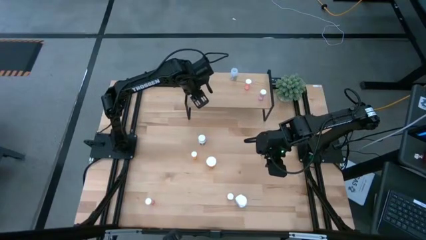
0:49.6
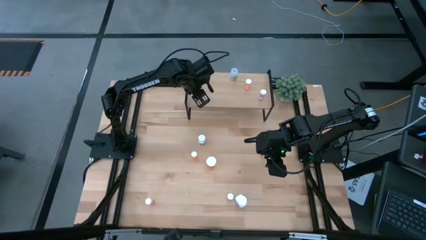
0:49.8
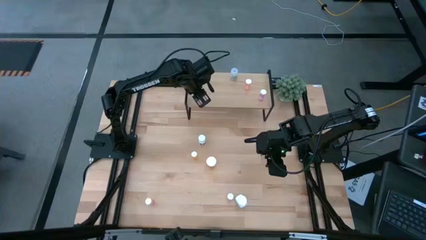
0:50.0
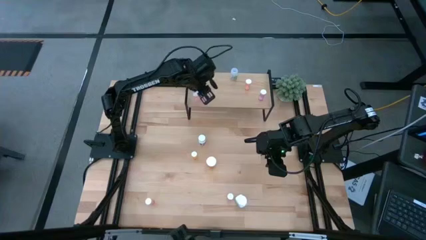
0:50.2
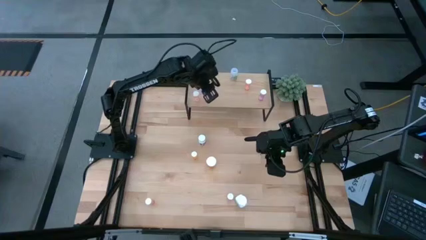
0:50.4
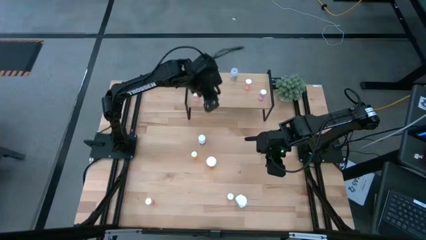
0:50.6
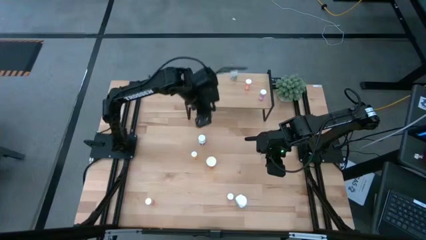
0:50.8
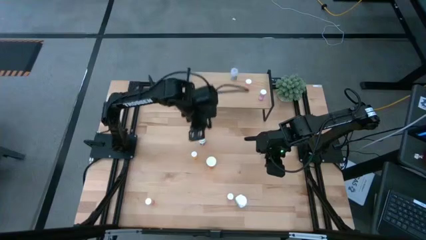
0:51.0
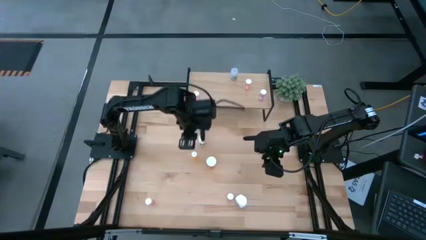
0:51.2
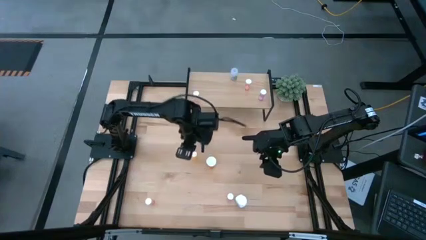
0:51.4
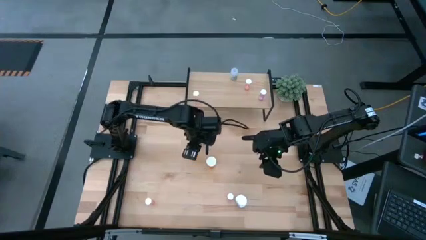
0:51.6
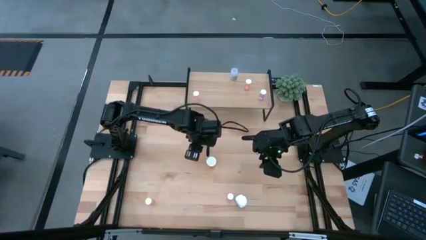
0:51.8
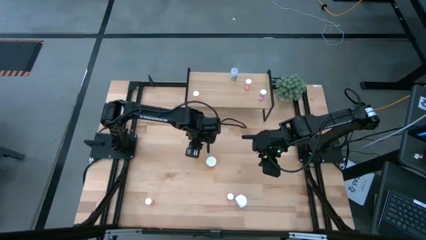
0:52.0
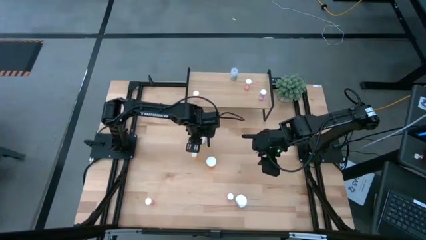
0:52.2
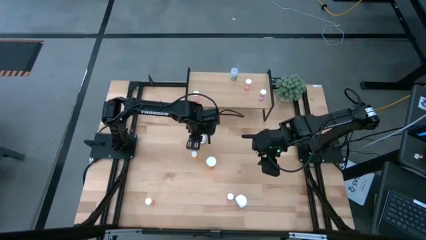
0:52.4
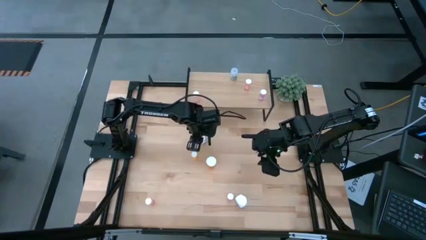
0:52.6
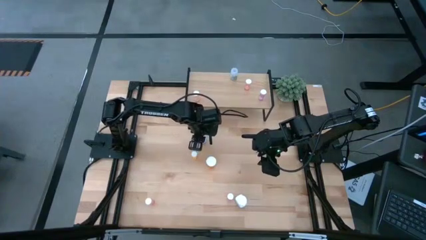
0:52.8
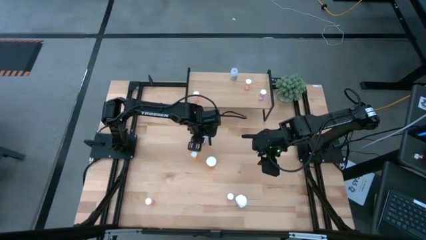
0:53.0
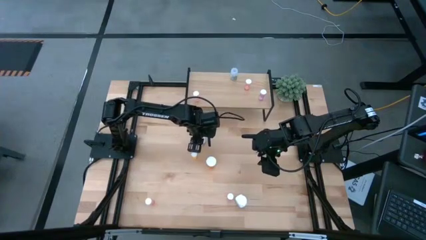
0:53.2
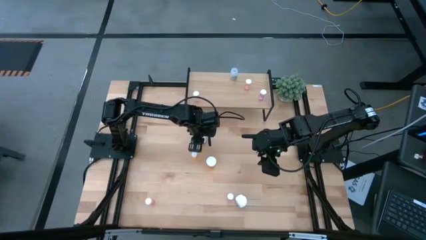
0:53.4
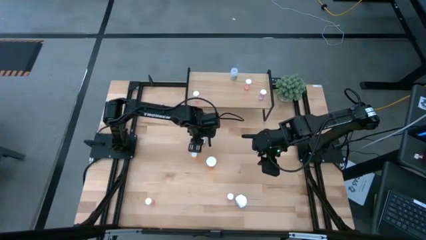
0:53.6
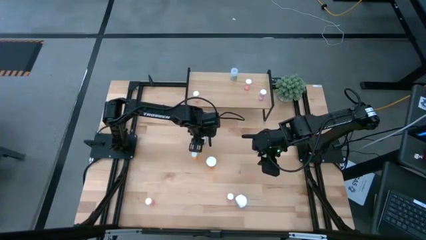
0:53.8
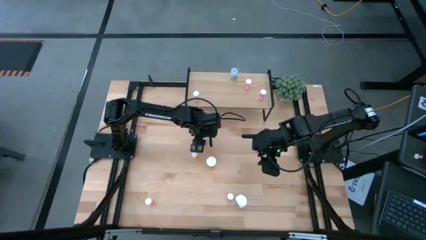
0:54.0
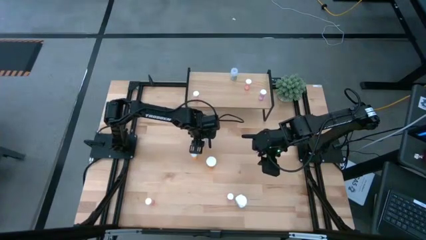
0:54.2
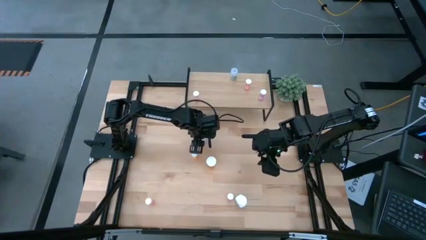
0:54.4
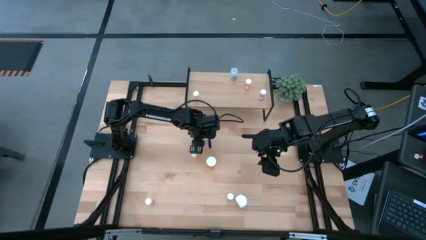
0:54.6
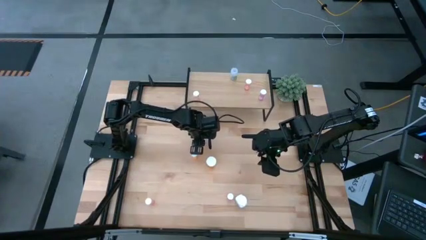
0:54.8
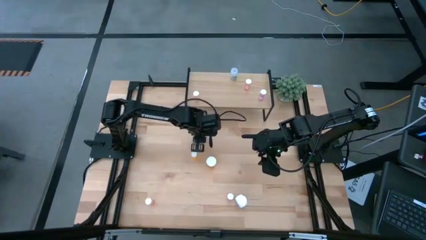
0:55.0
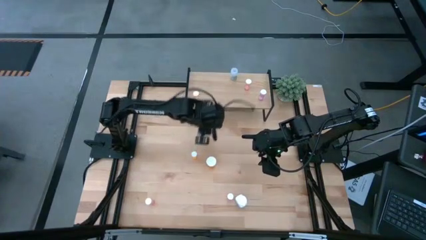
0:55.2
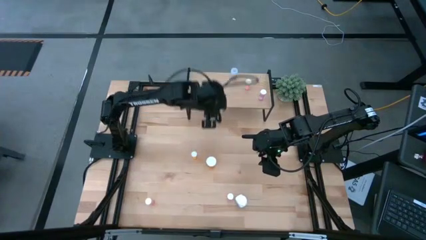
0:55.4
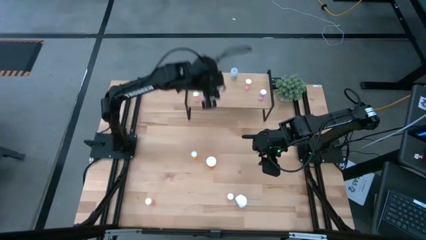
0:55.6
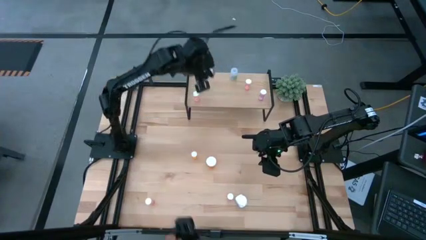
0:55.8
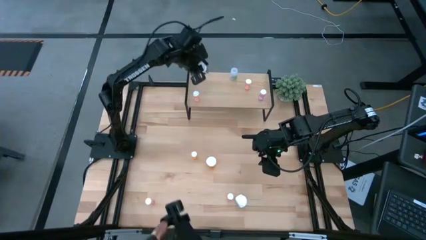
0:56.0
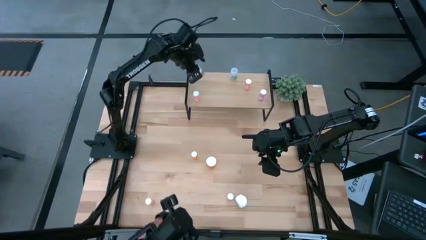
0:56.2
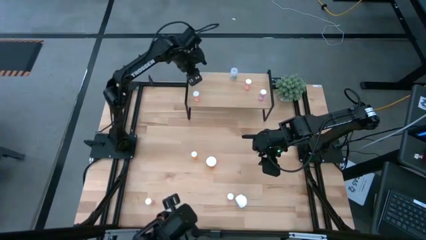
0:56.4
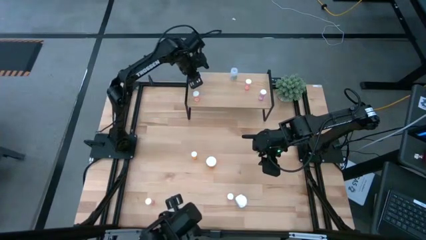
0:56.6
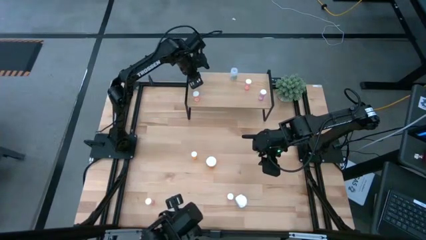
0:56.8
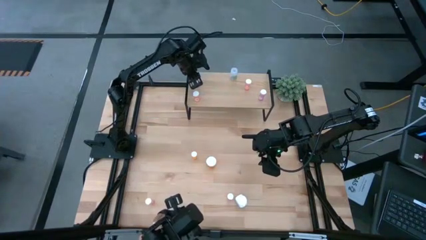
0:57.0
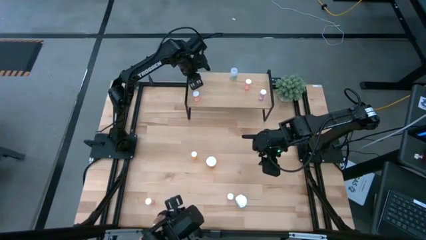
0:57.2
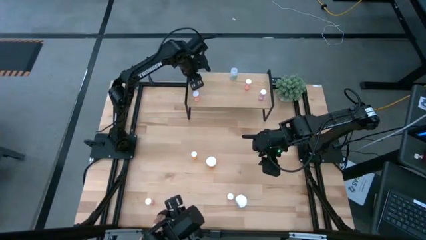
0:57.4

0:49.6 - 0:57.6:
Task: Pick and place medicine bottles onto shelf by color
Put the white pill bottle on the shelf

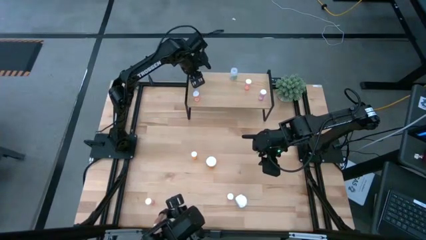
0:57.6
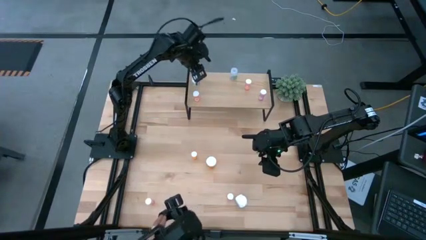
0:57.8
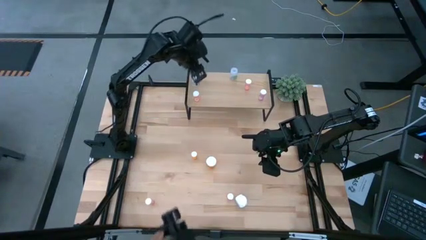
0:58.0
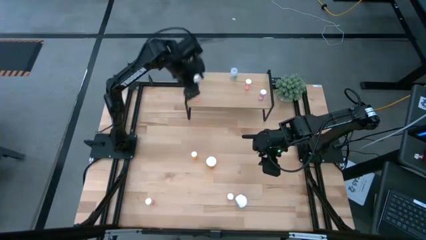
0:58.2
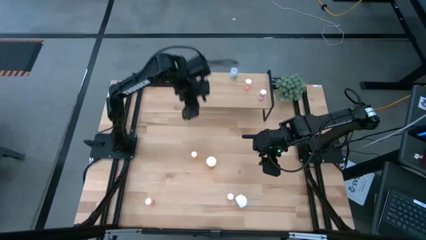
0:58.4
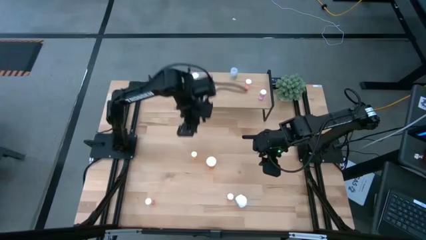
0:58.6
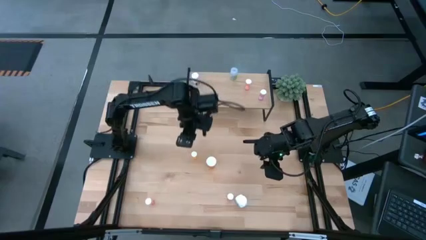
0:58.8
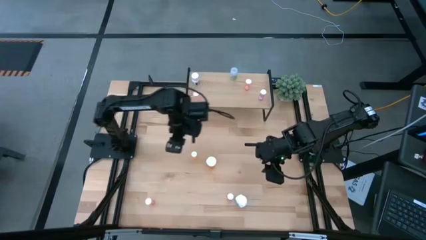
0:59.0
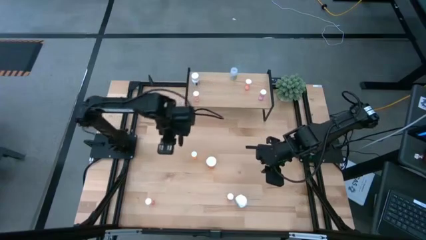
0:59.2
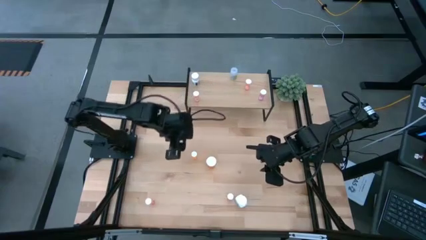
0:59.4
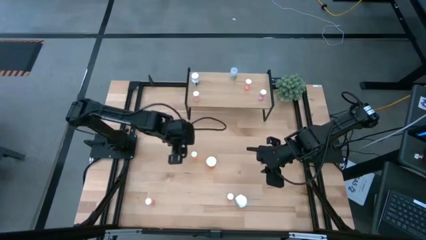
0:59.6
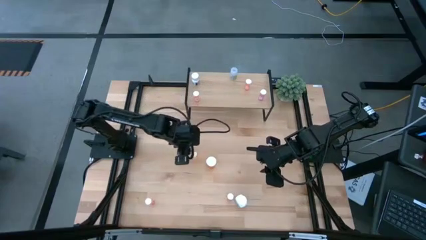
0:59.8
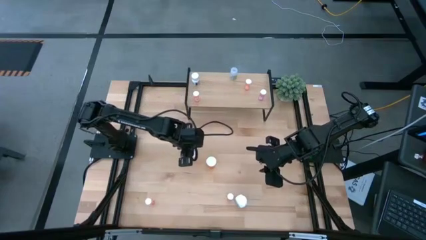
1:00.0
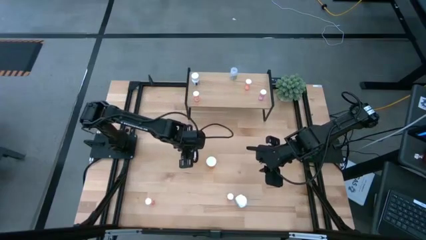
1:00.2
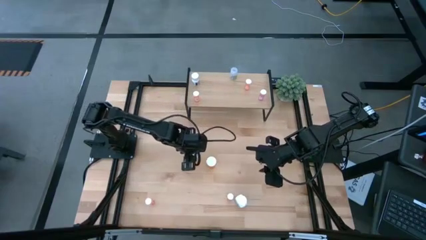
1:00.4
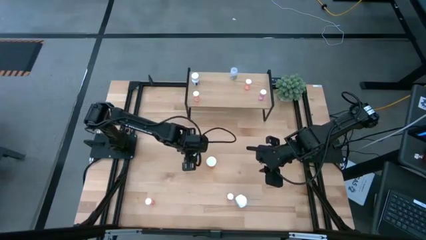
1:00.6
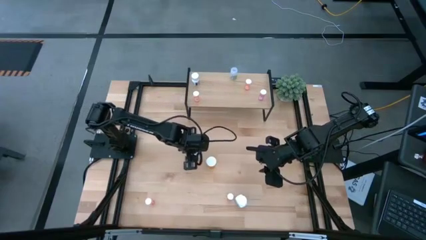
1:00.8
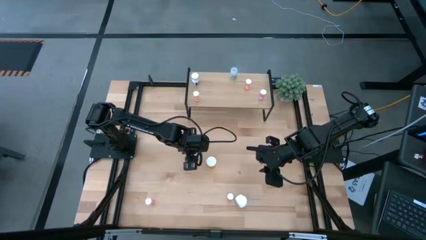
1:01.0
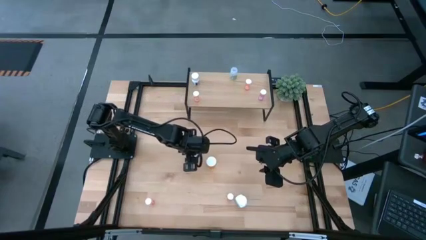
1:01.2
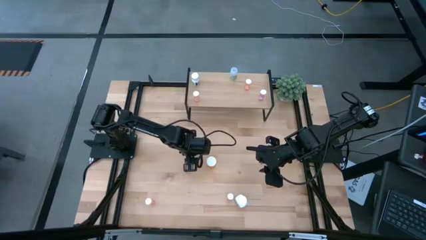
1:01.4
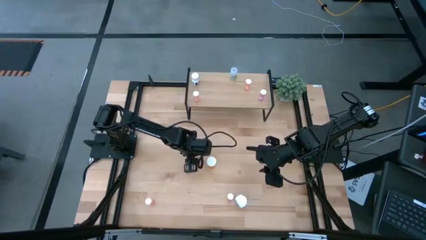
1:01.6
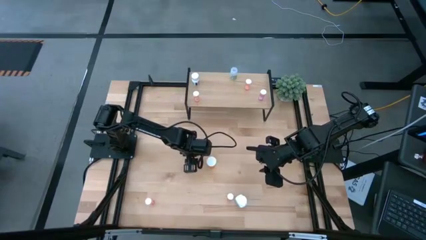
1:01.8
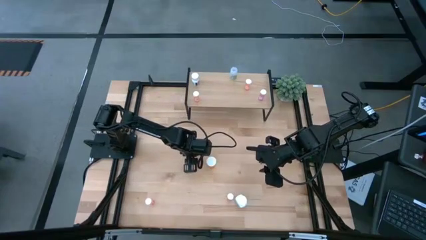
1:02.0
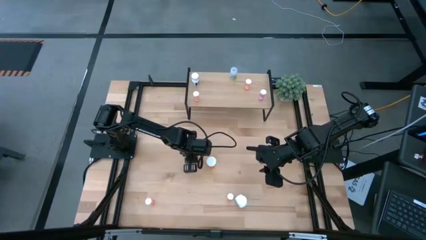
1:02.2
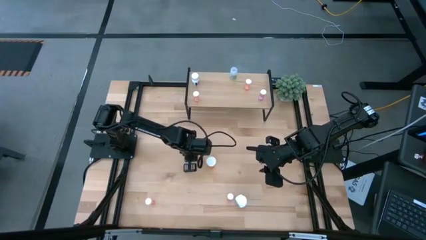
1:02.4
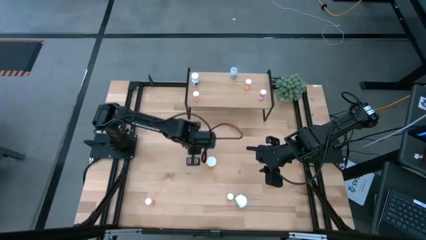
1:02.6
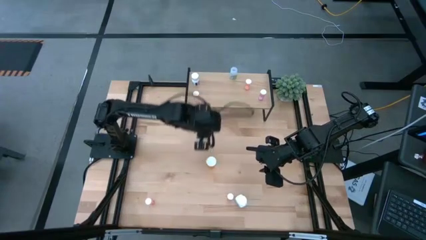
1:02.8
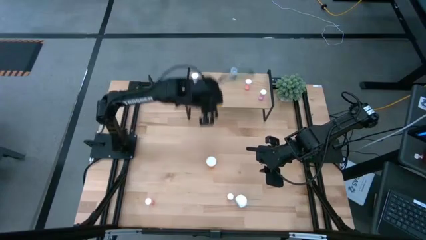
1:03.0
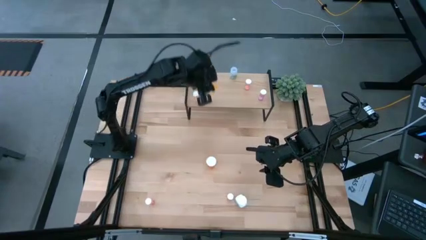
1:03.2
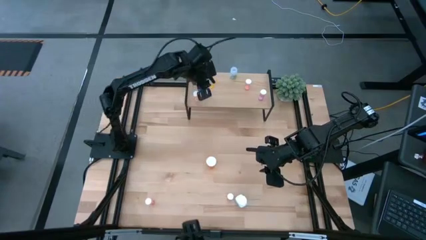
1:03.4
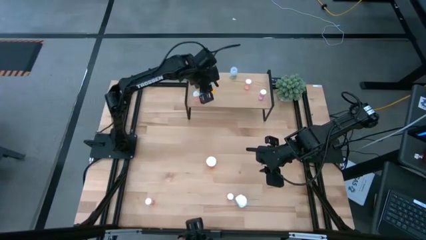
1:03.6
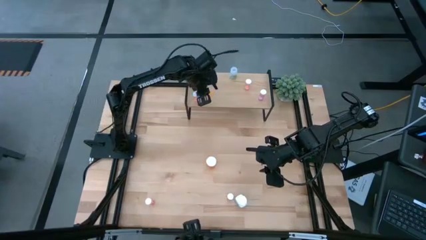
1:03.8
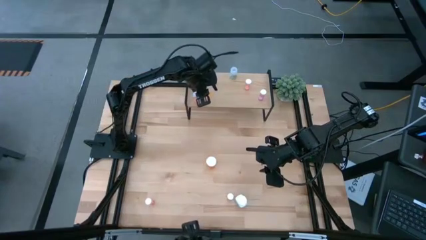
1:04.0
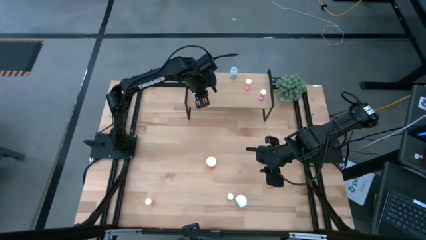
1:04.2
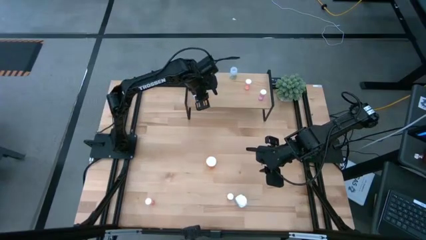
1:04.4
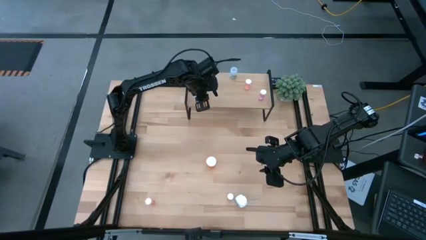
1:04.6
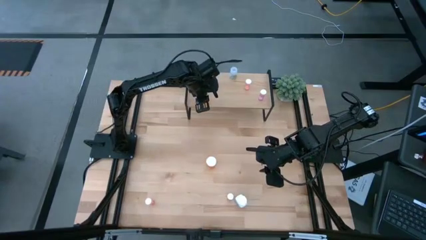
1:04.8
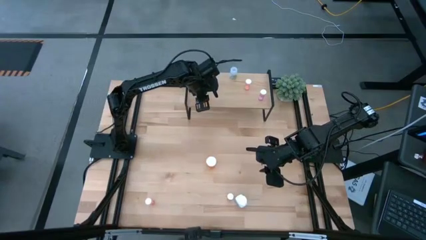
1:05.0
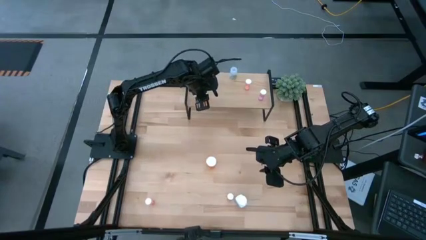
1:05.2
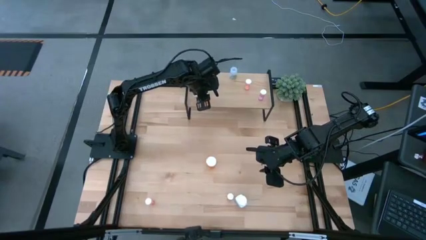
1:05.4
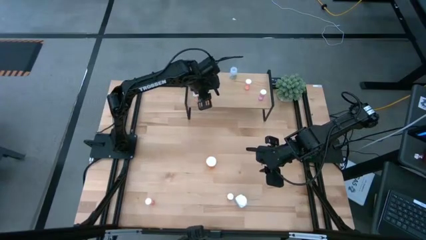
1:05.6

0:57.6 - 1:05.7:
Put the left orange pill bottle on the shelf
